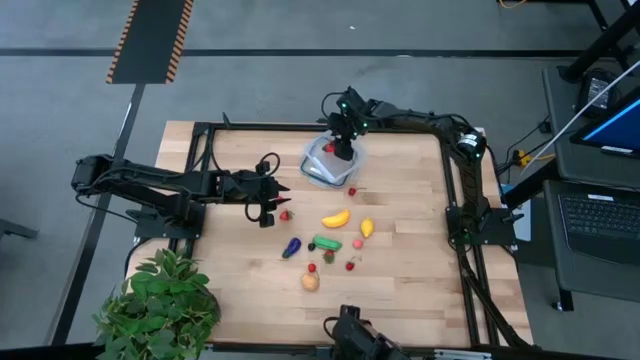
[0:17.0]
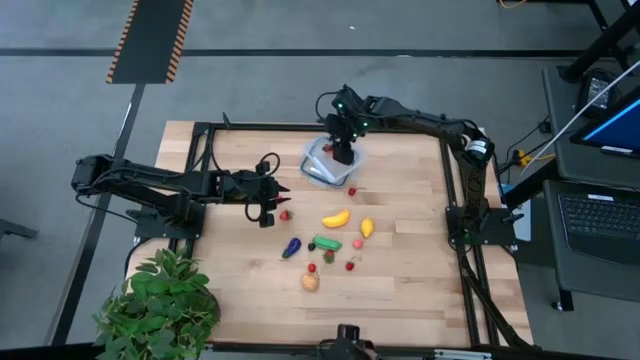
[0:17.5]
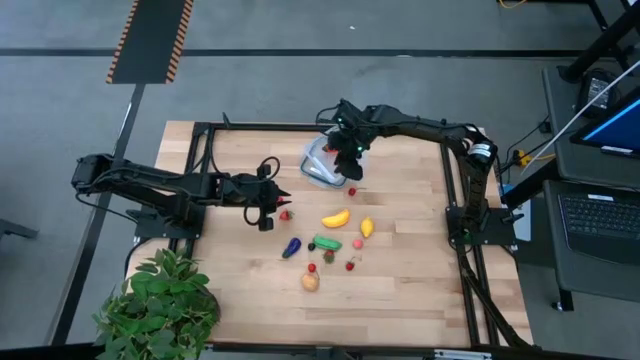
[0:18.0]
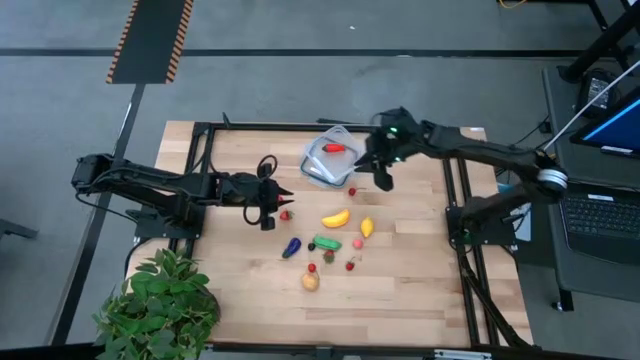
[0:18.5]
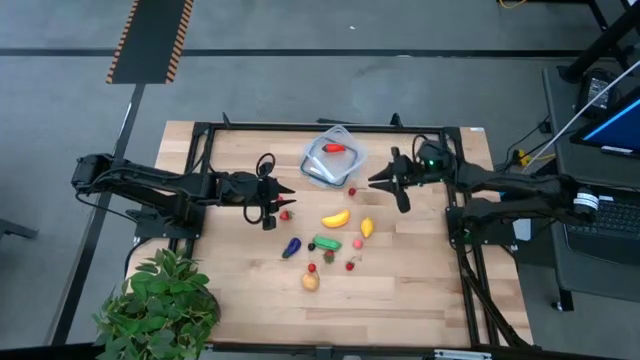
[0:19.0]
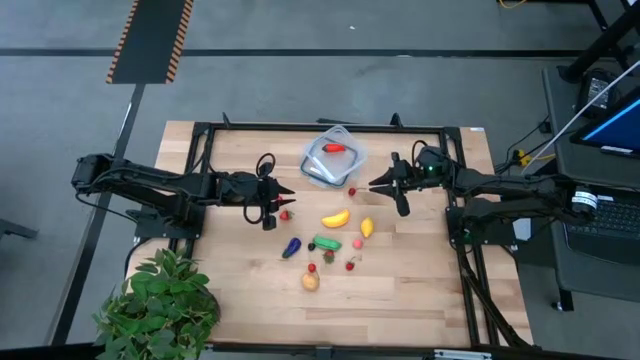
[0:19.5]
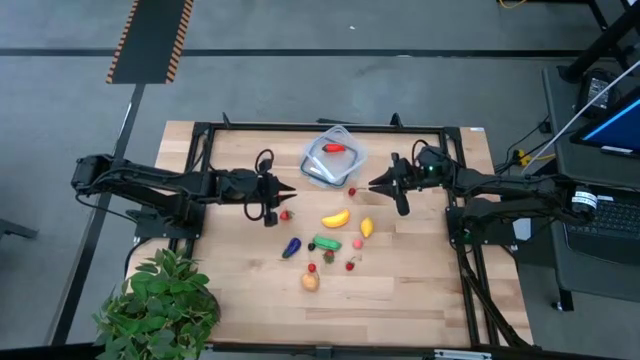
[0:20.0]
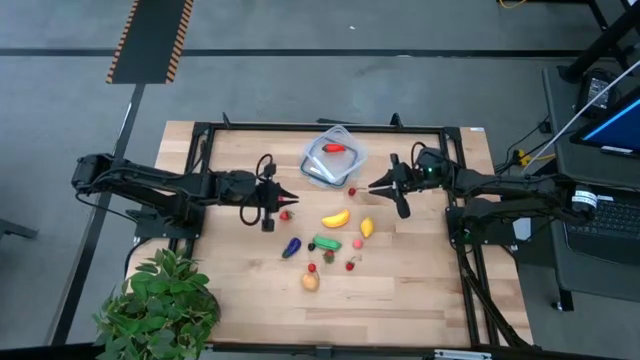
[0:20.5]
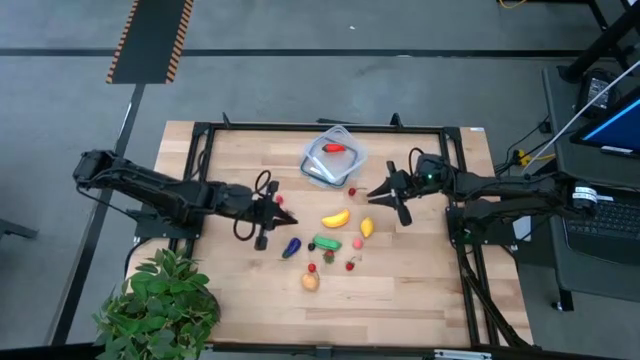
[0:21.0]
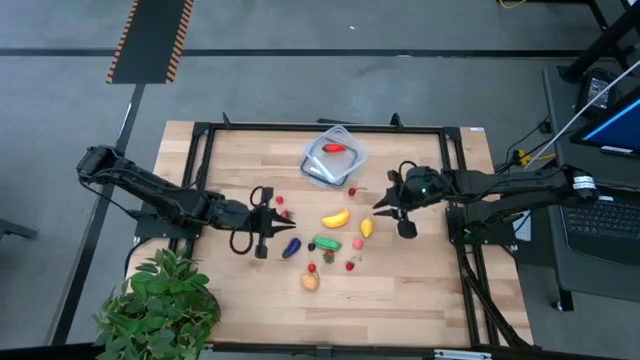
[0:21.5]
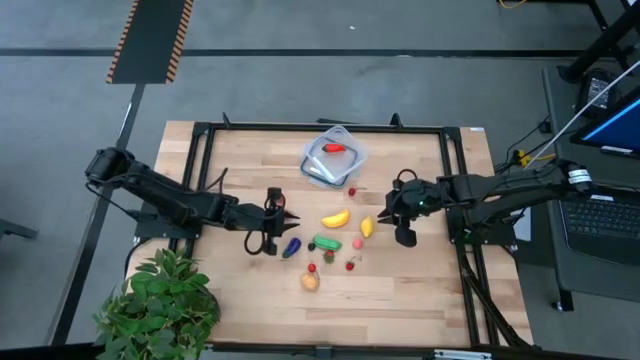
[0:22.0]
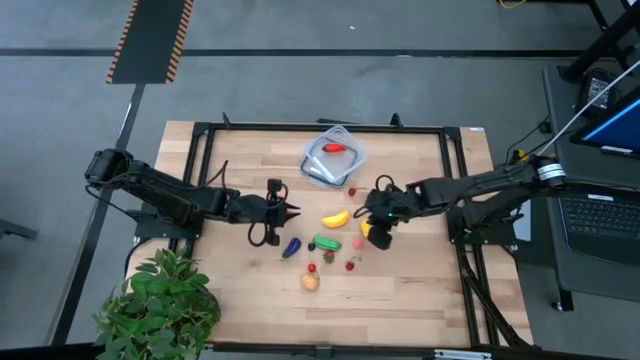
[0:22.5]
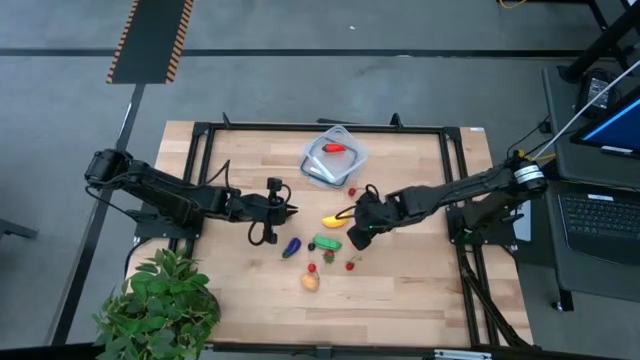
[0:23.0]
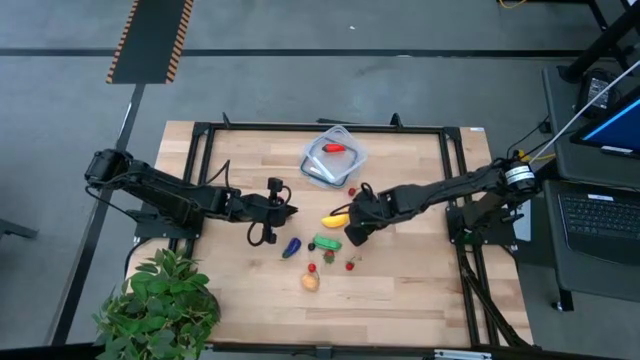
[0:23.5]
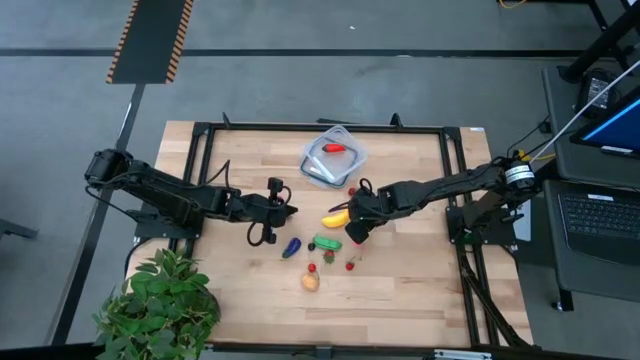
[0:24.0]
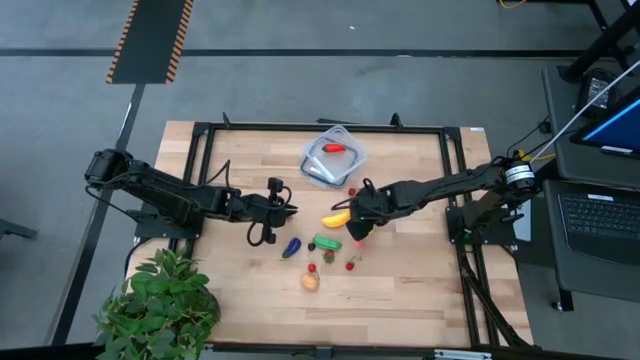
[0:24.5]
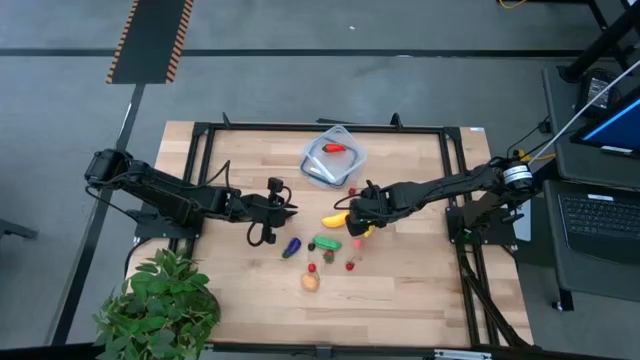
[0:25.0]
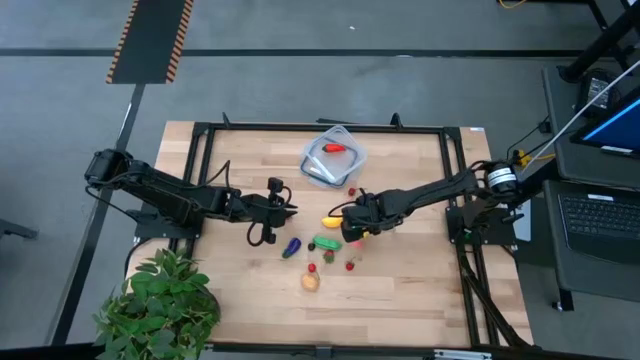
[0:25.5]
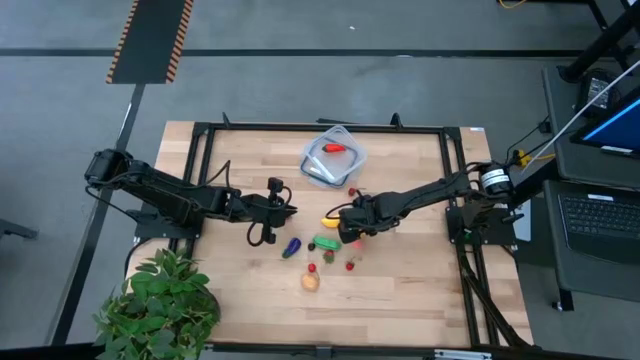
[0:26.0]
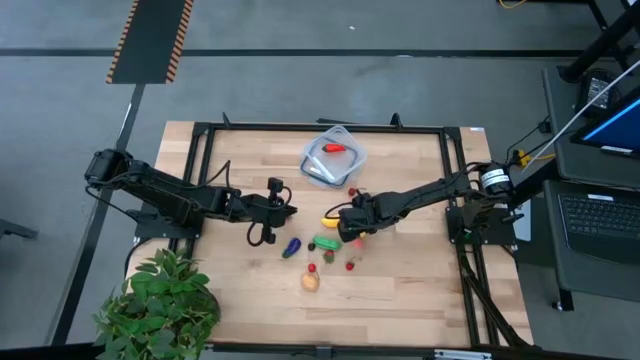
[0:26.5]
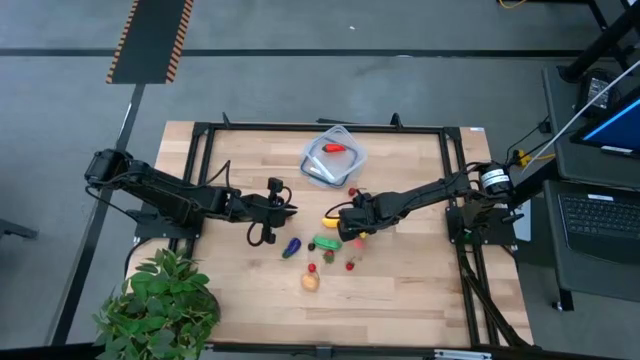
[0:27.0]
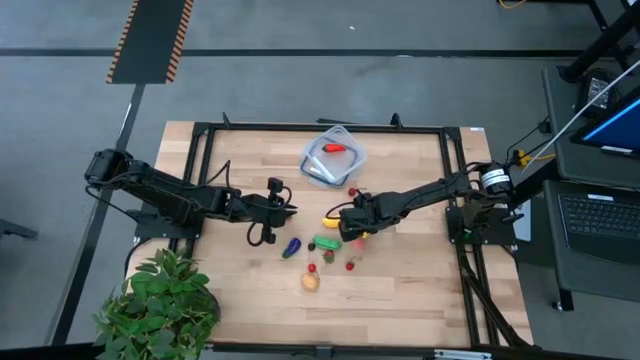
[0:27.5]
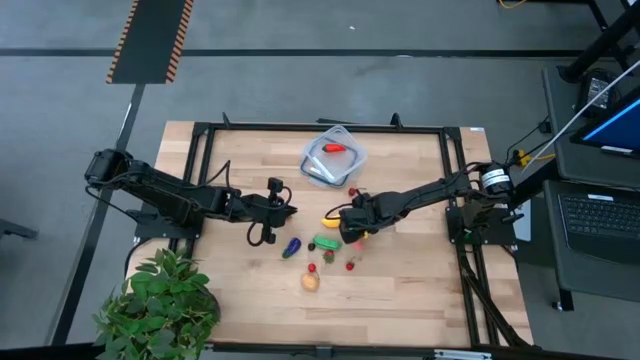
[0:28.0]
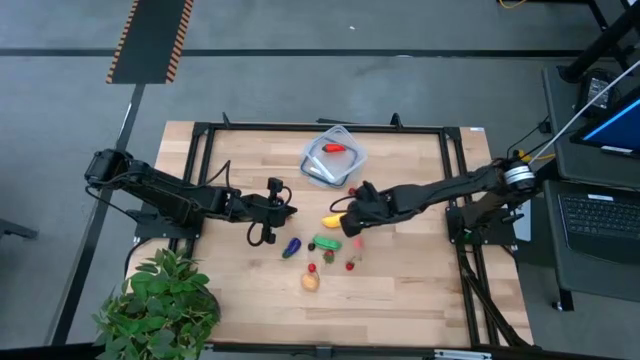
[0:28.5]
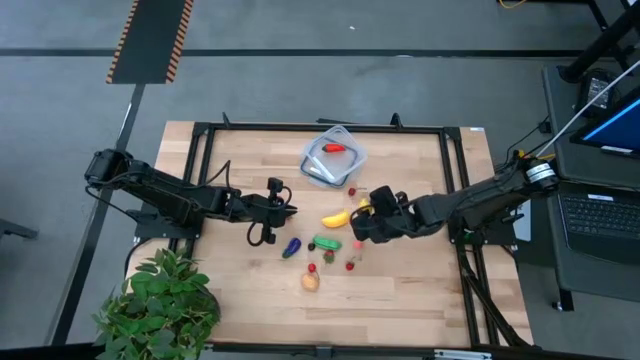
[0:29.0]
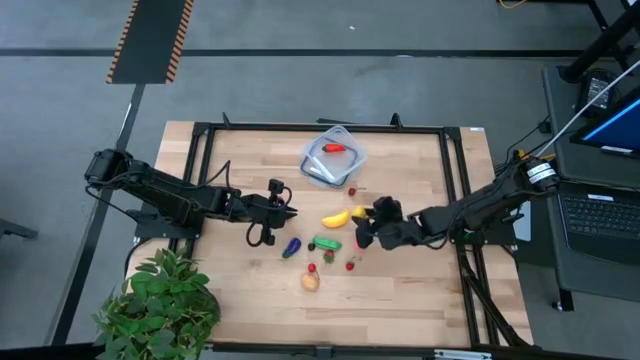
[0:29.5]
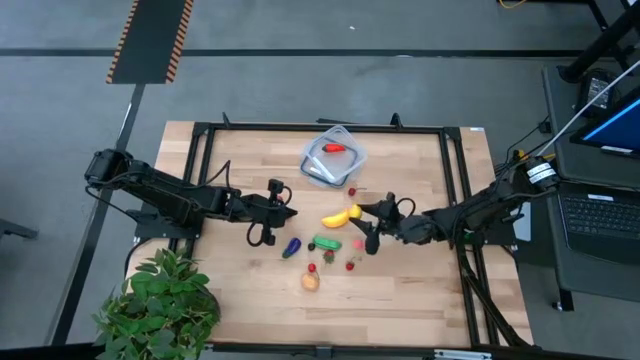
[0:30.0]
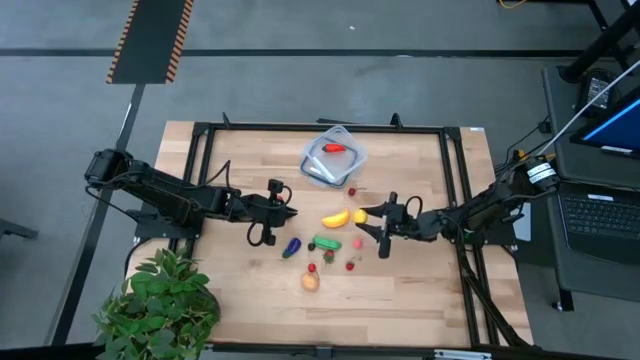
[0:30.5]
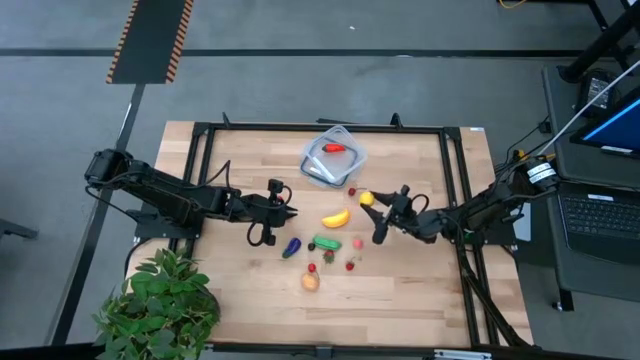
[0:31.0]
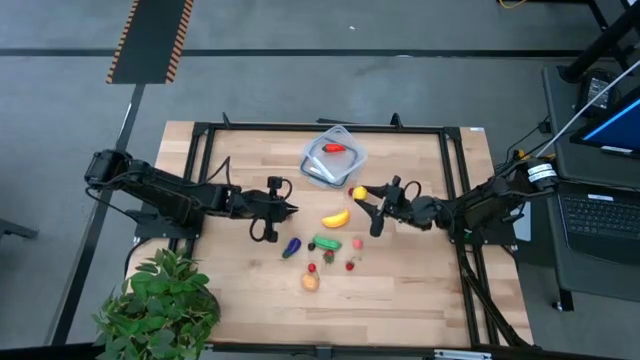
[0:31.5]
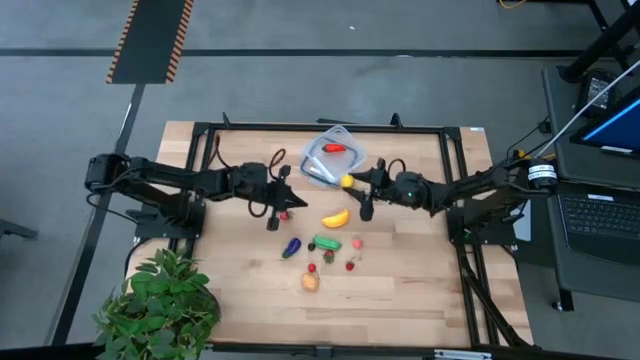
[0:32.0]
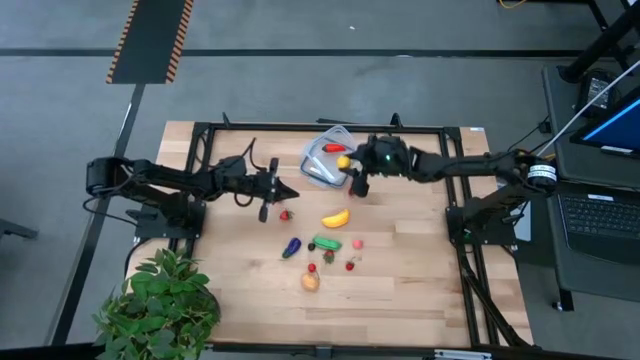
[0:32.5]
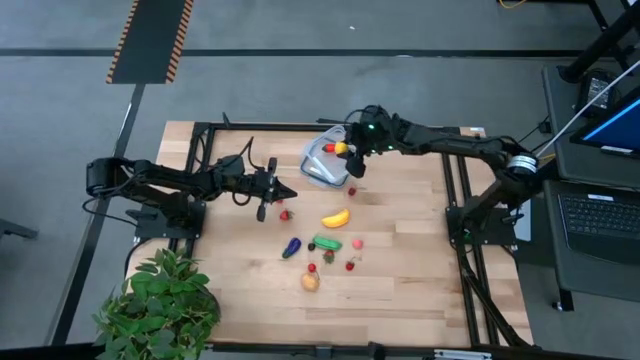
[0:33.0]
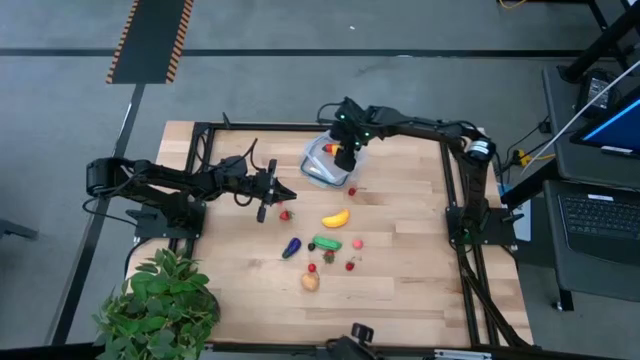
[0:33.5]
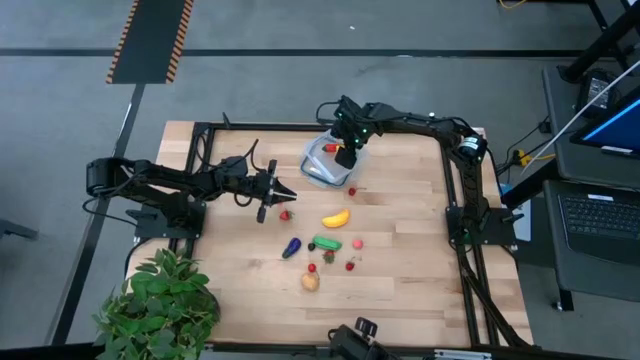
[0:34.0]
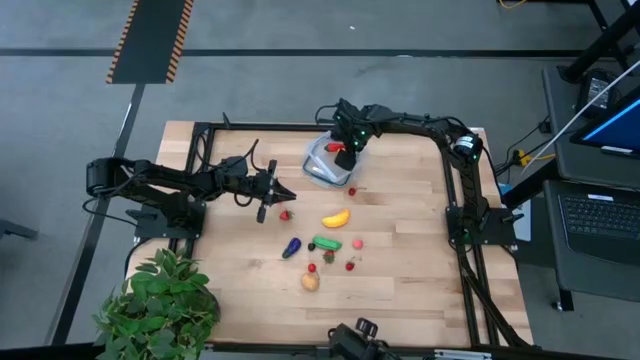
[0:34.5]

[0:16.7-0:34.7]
Task: Pick and placing Produce into tupperware
Put the yellow lemon into the transparent container

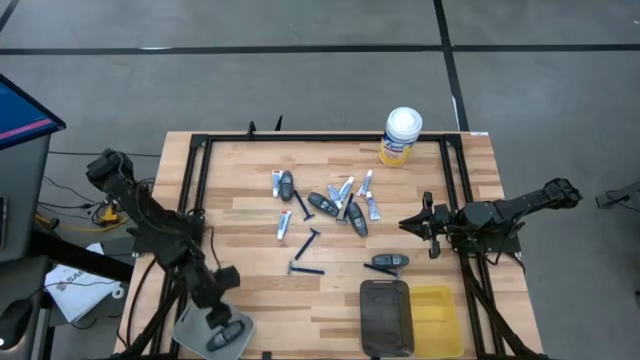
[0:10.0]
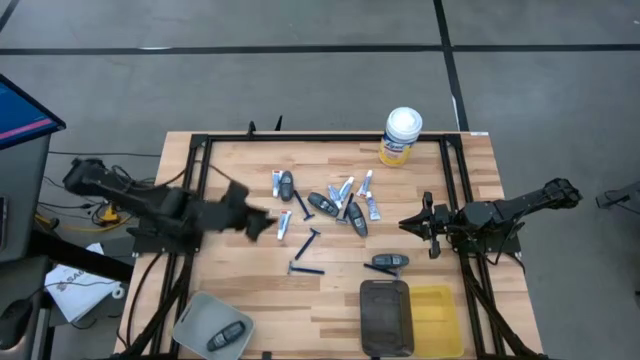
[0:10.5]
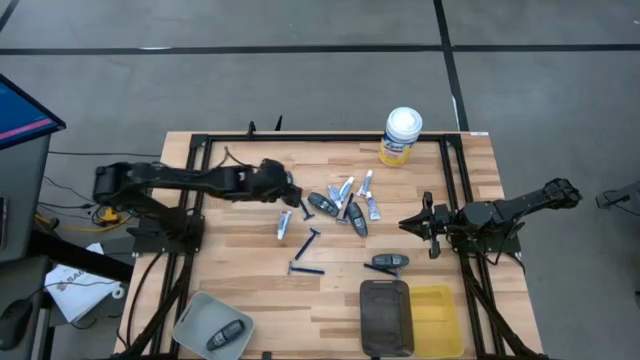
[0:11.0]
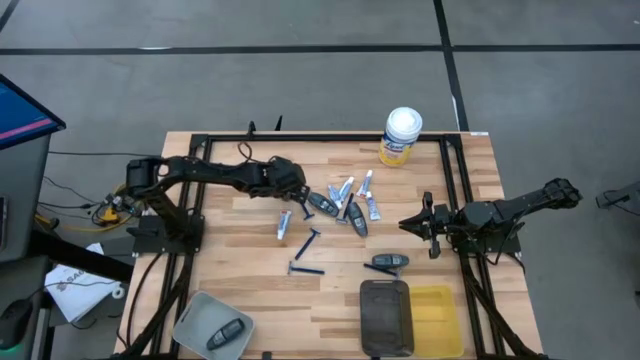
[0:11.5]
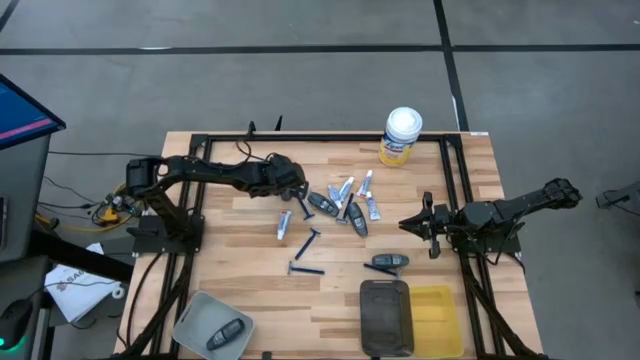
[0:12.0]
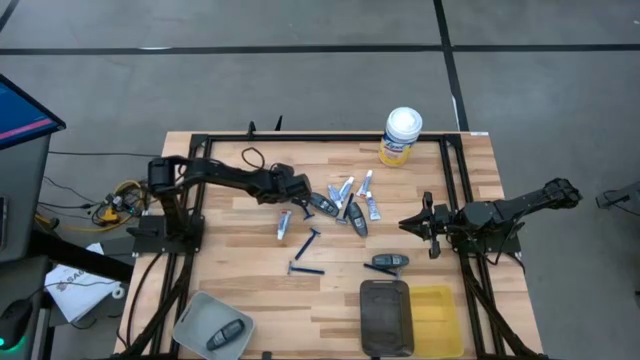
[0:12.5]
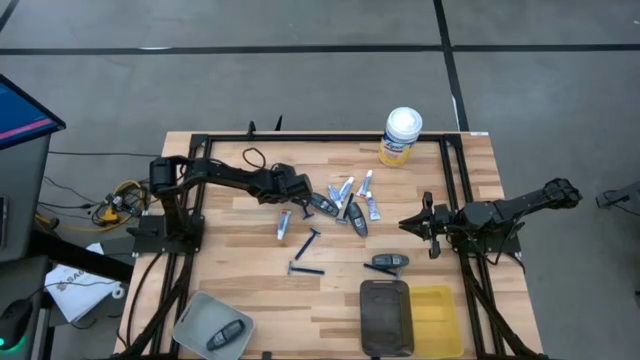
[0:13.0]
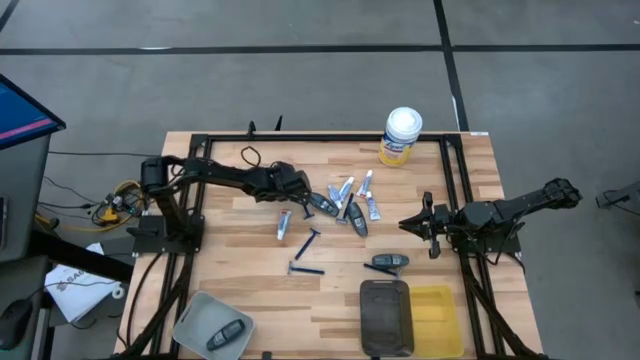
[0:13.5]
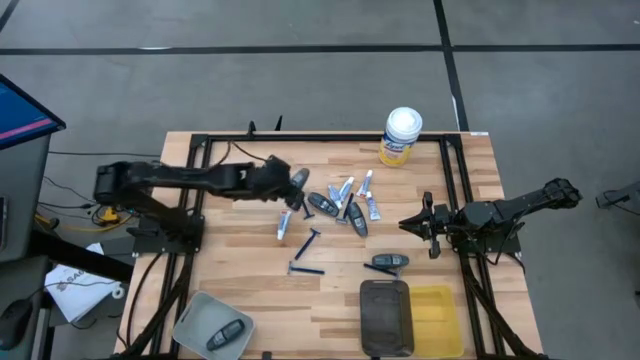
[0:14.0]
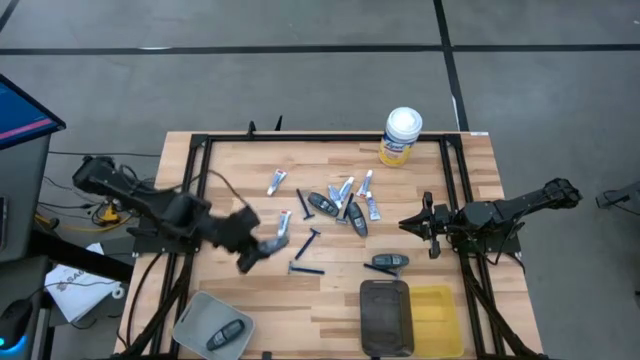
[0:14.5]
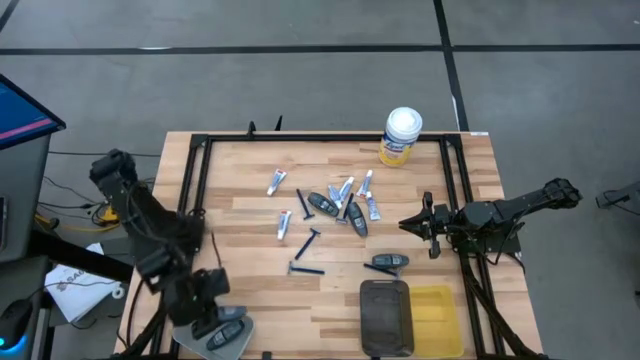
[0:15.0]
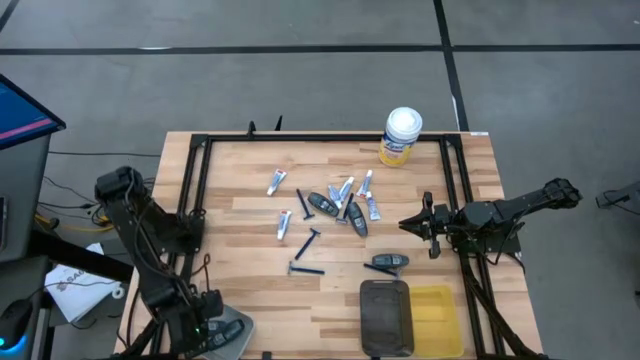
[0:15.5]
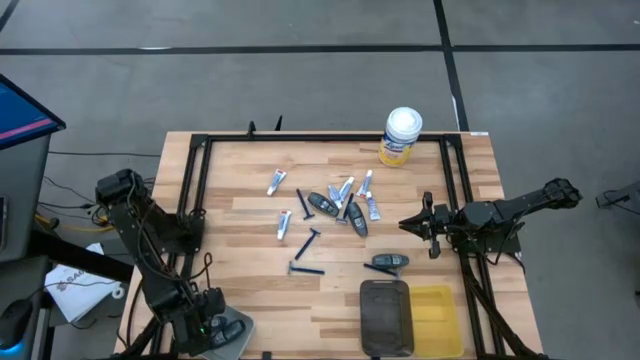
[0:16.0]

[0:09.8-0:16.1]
Task: Pick & Place Travel size toiletries
Put the deodorant into the gray bin
